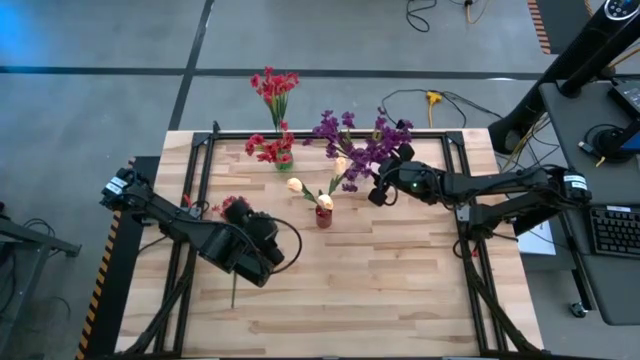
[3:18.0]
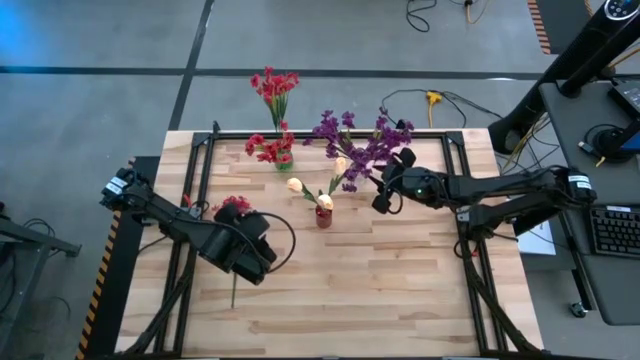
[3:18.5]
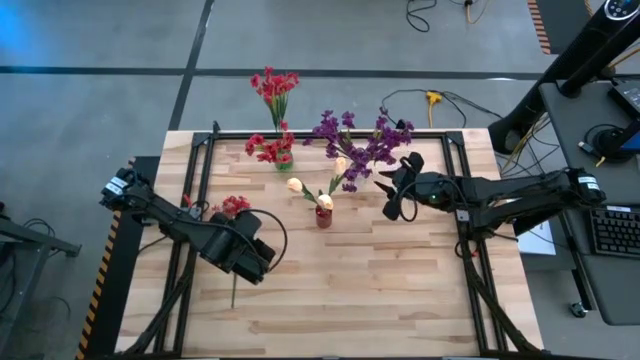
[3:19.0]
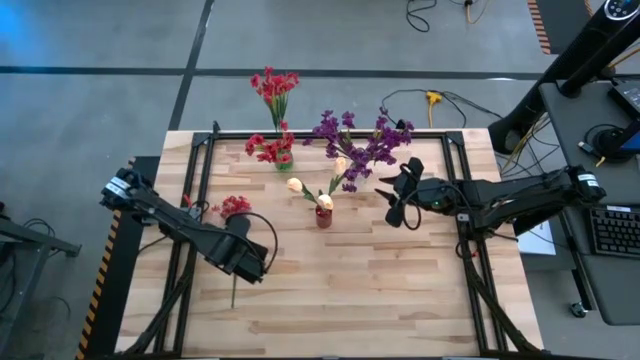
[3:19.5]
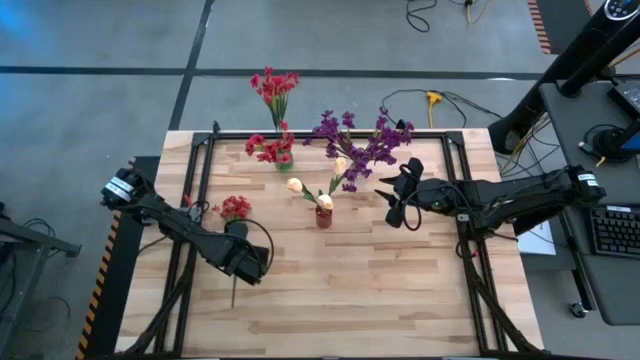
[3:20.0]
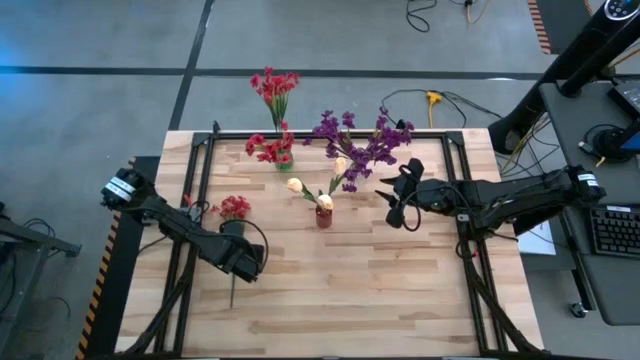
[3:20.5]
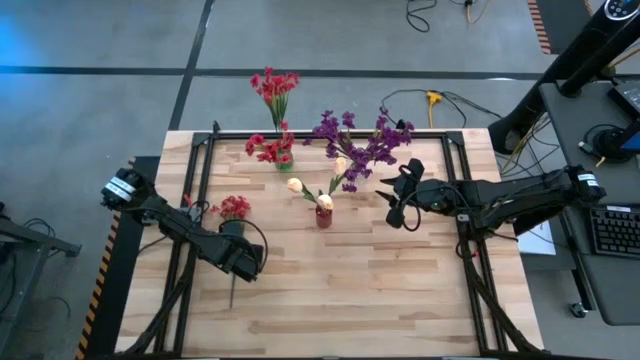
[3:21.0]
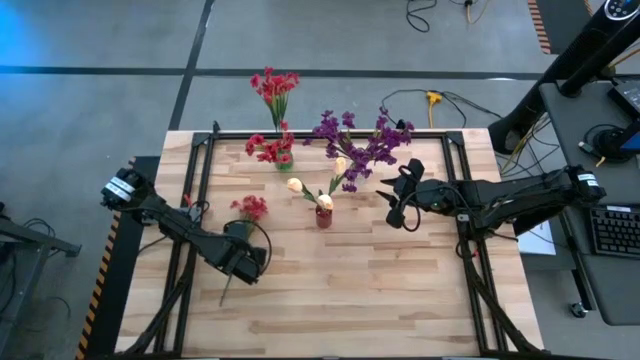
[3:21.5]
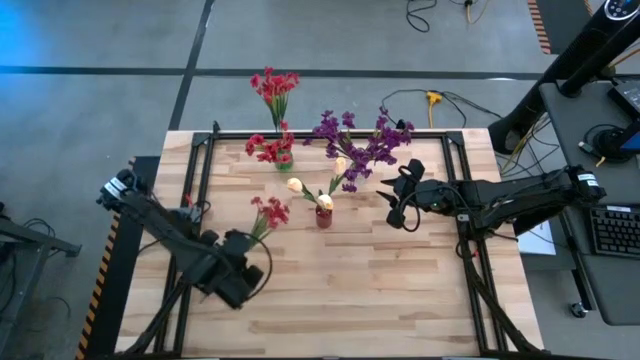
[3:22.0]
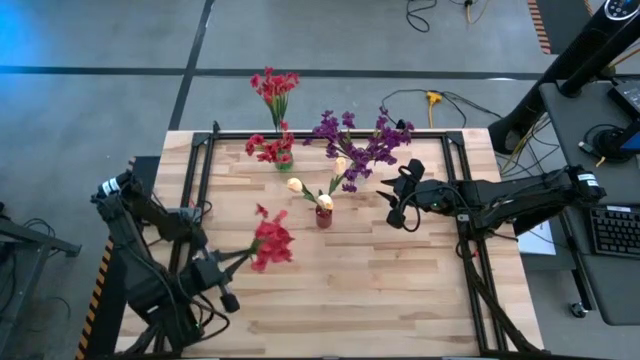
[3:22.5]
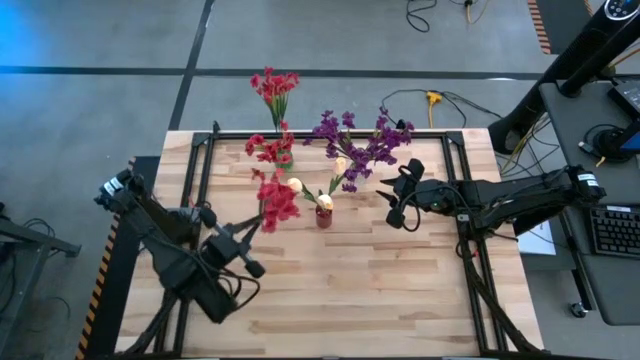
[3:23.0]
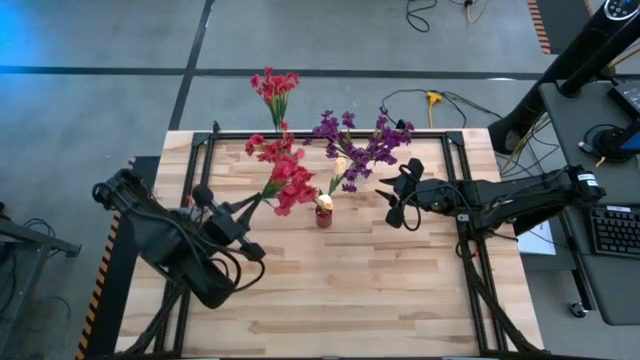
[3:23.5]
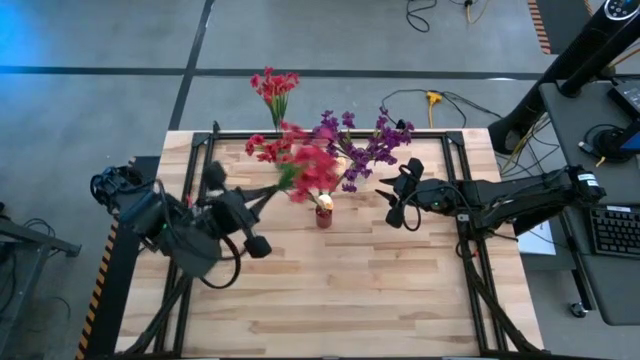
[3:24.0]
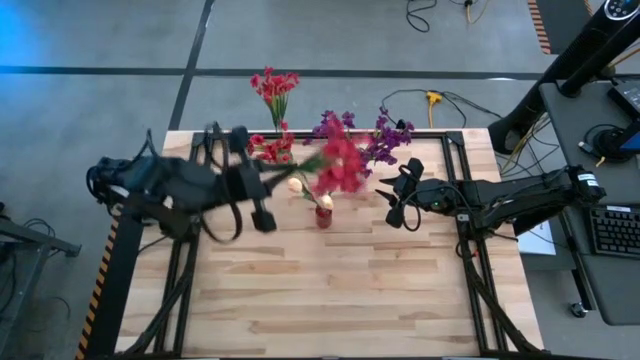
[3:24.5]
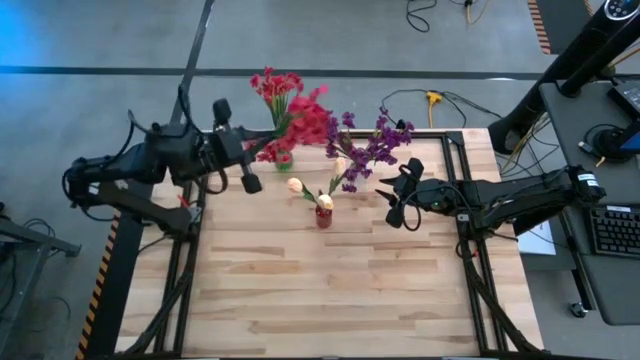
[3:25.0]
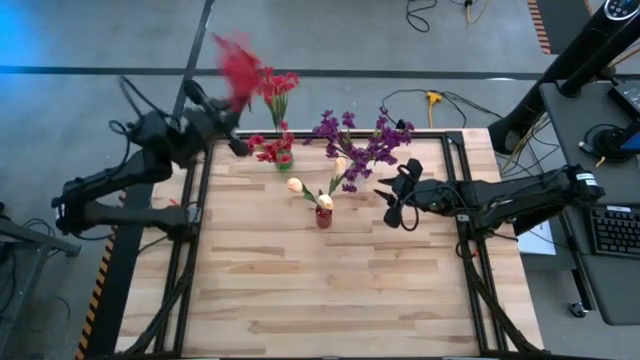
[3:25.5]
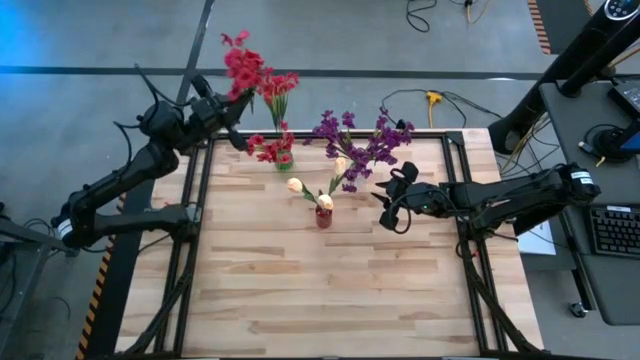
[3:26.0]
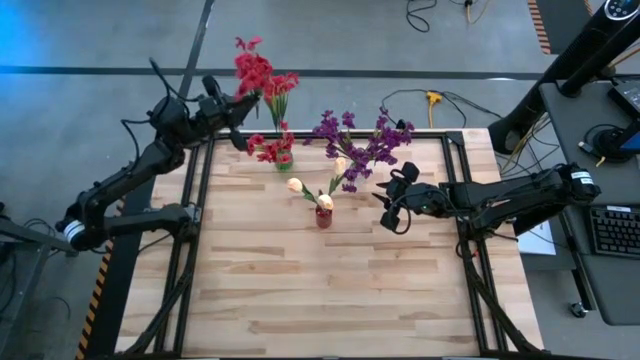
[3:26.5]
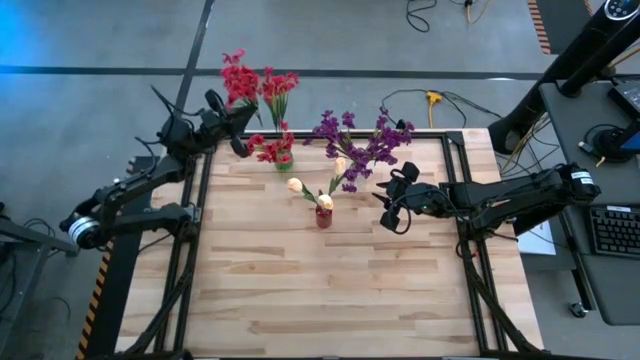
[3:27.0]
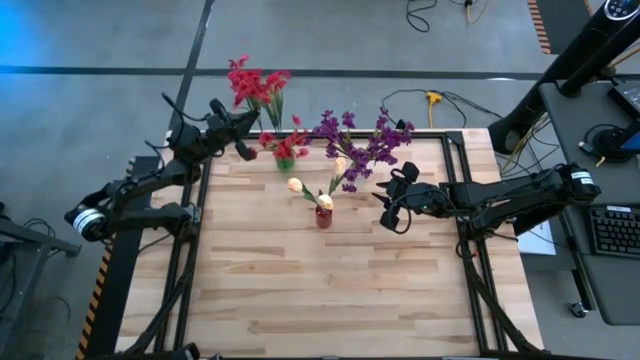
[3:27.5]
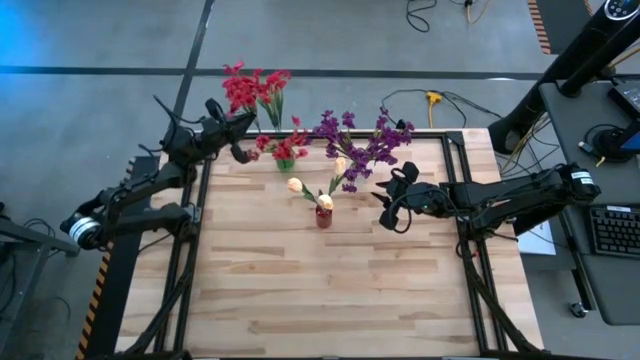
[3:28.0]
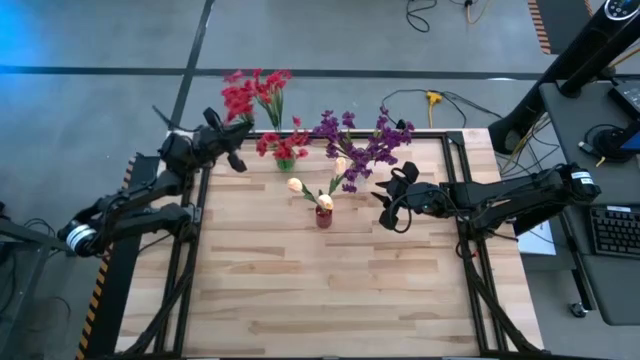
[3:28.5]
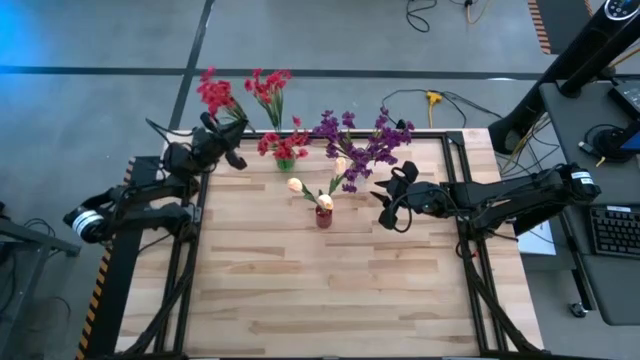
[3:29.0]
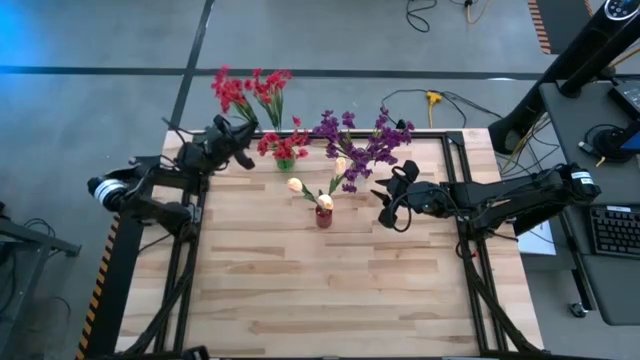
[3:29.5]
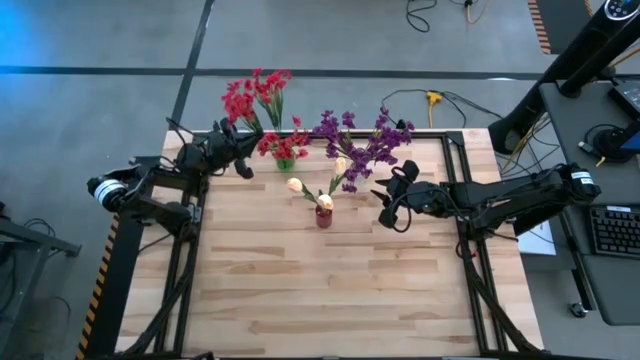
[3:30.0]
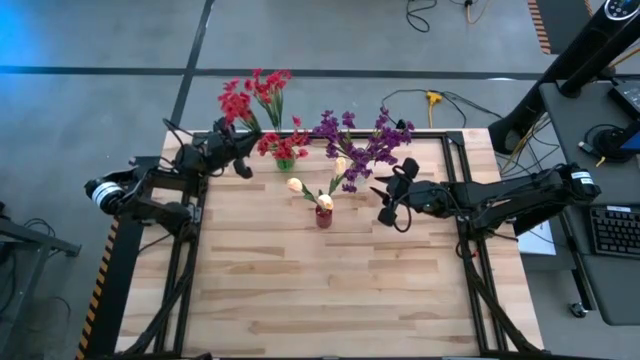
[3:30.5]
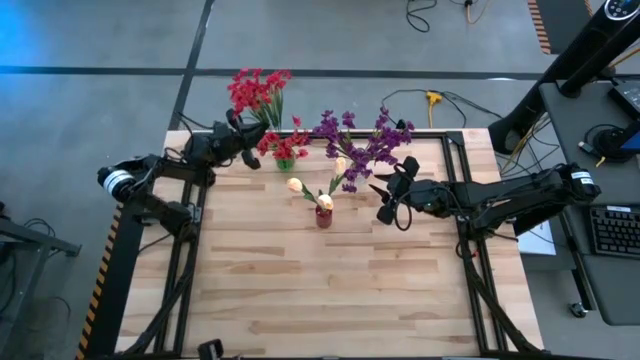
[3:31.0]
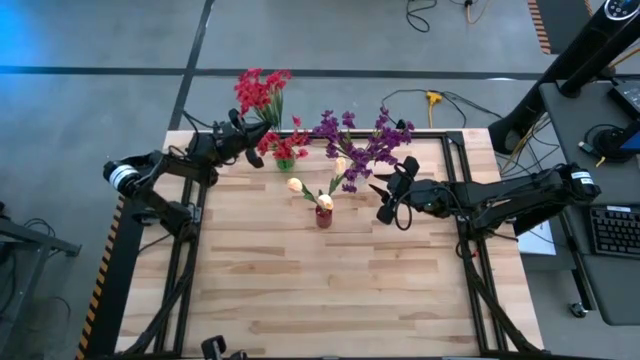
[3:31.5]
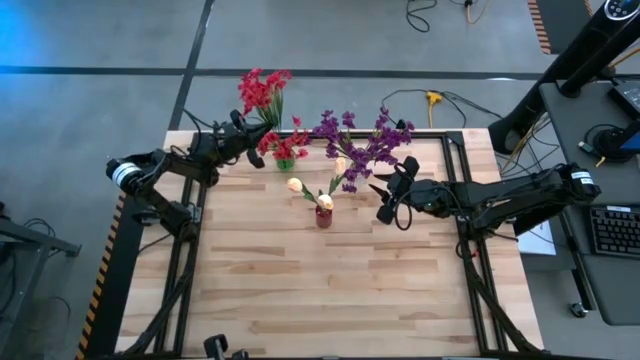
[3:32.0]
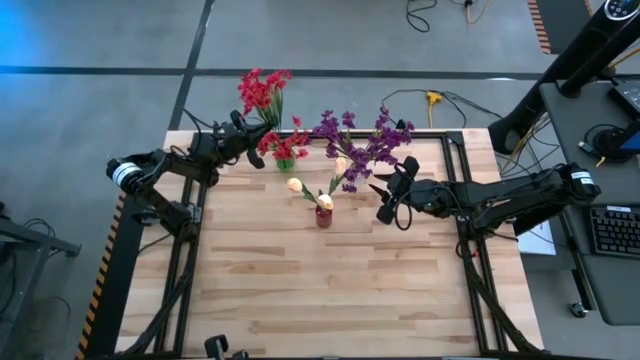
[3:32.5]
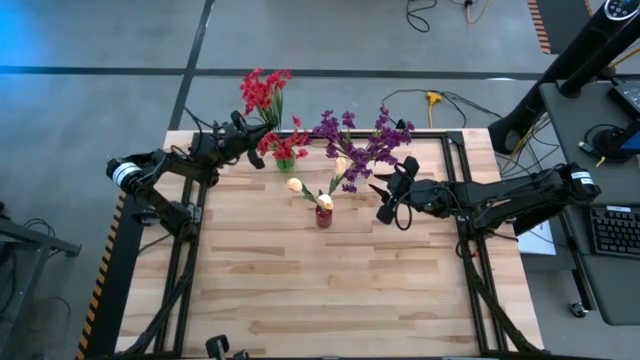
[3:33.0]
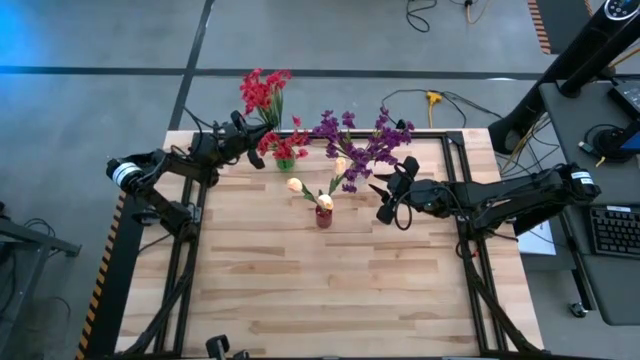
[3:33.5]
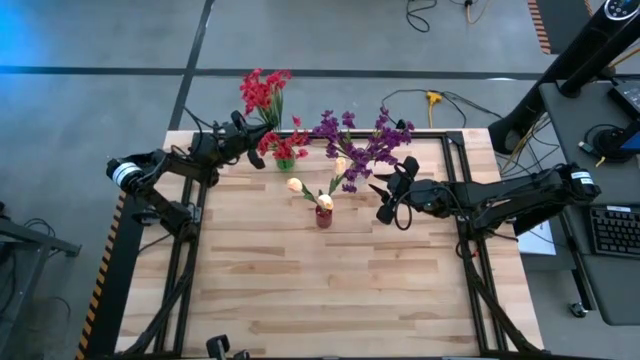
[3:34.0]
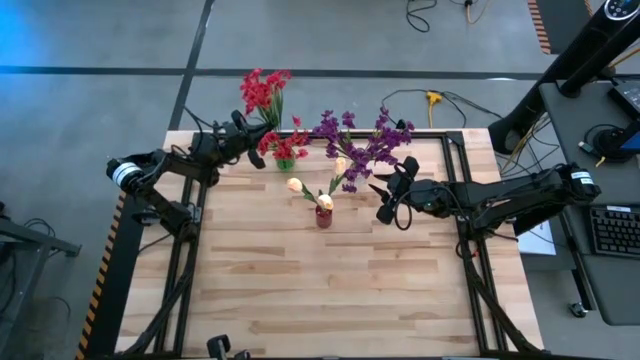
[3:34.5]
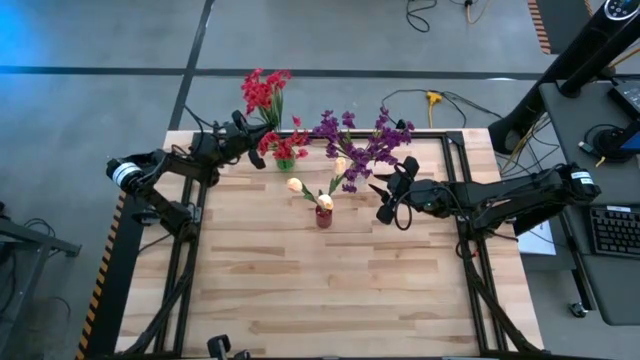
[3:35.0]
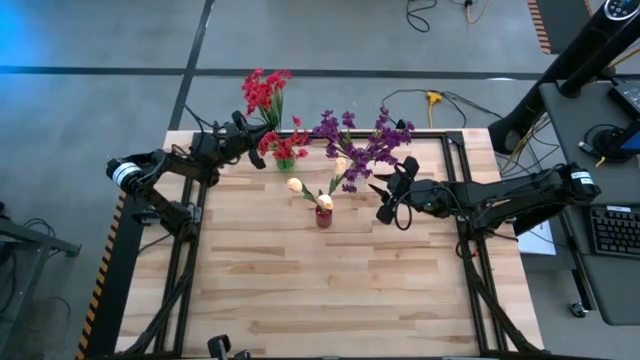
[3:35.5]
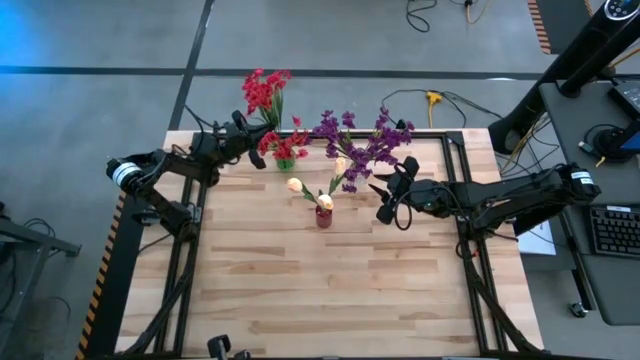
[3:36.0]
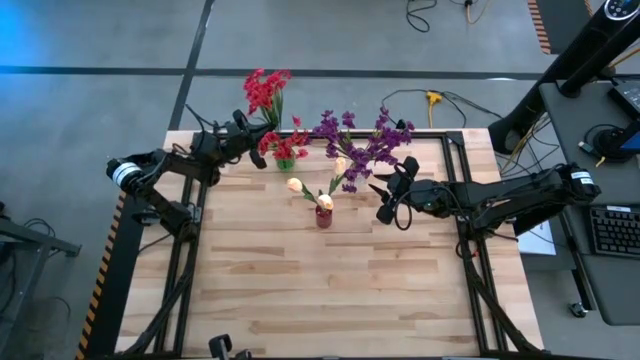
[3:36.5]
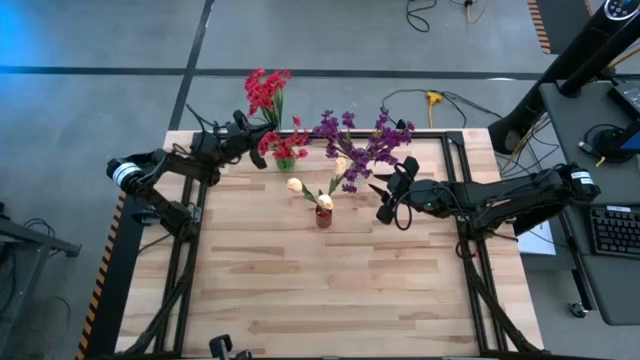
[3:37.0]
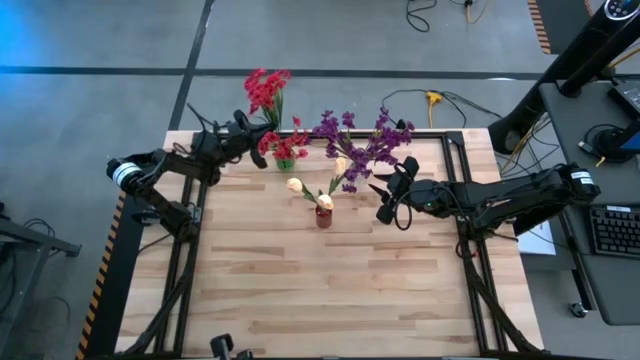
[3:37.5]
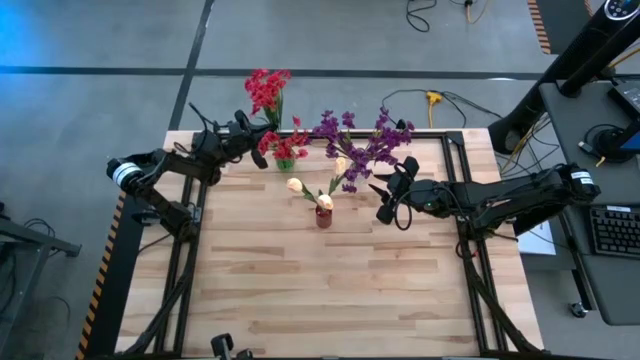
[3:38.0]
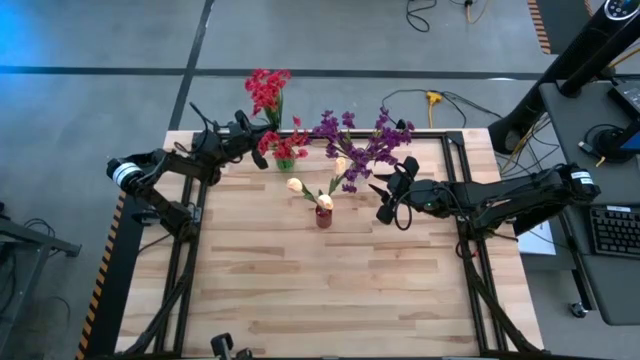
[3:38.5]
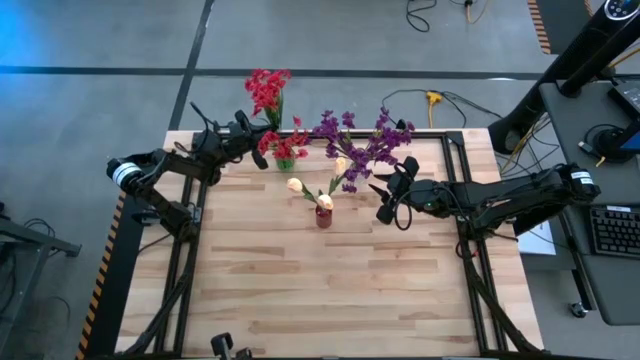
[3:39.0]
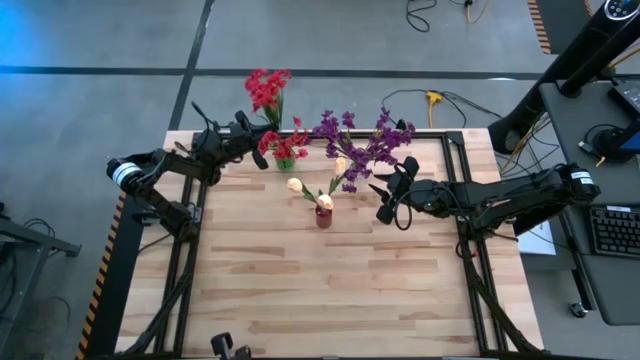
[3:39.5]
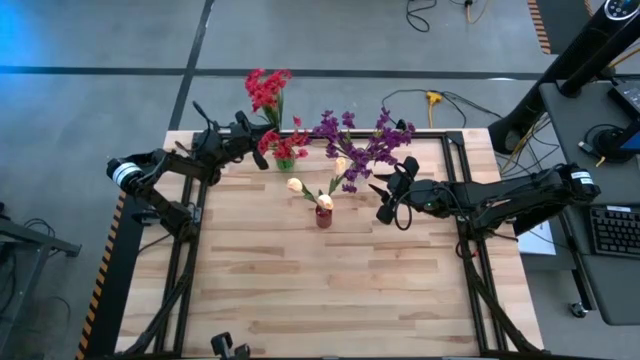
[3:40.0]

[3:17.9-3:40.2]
Task: Sort flowers into vase by color
Put the red flowers into the green vase
